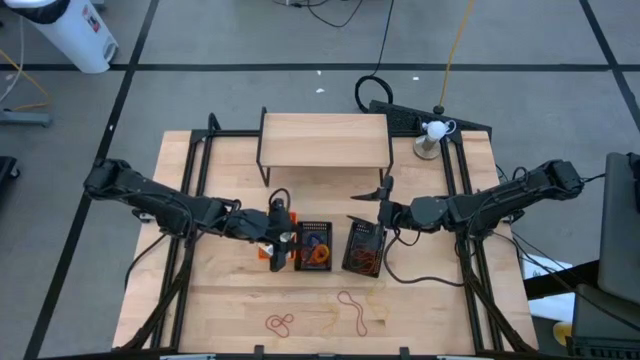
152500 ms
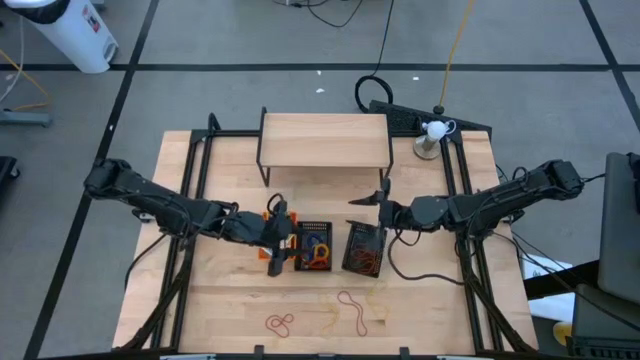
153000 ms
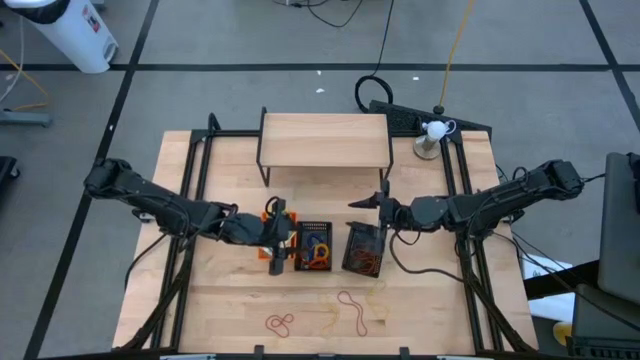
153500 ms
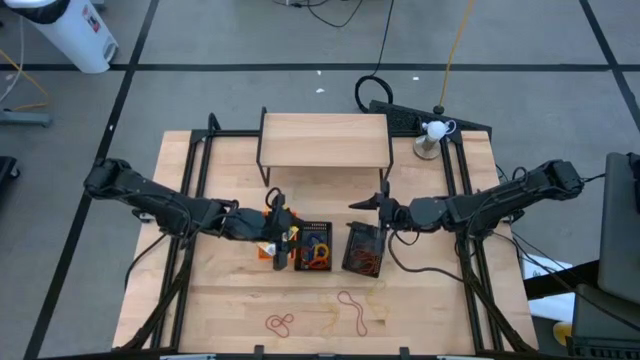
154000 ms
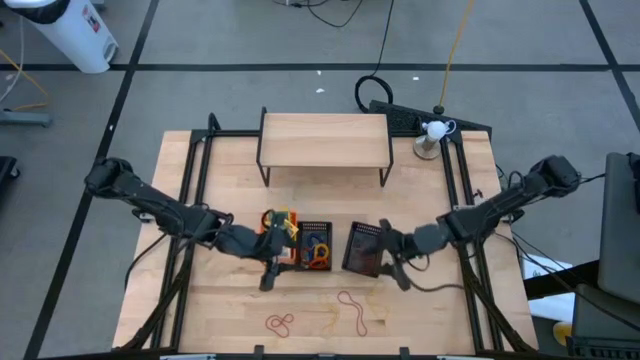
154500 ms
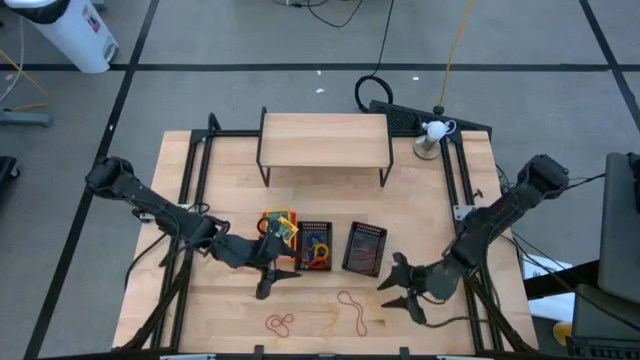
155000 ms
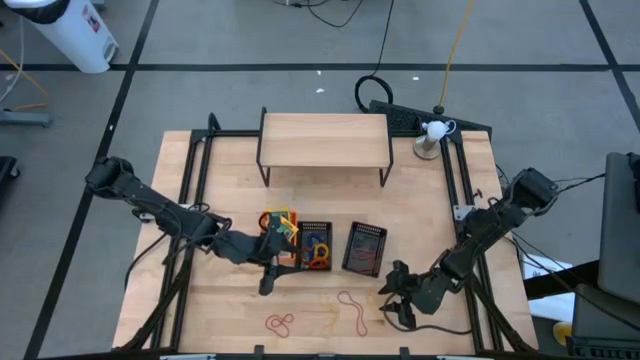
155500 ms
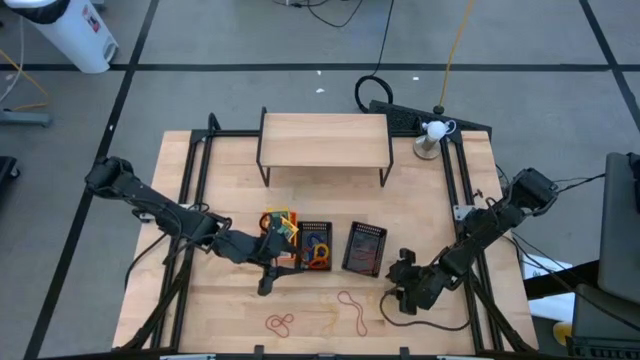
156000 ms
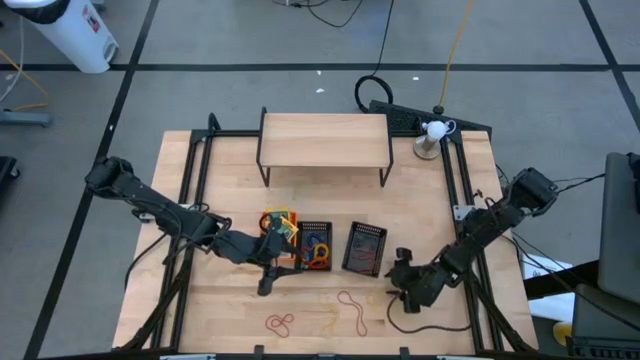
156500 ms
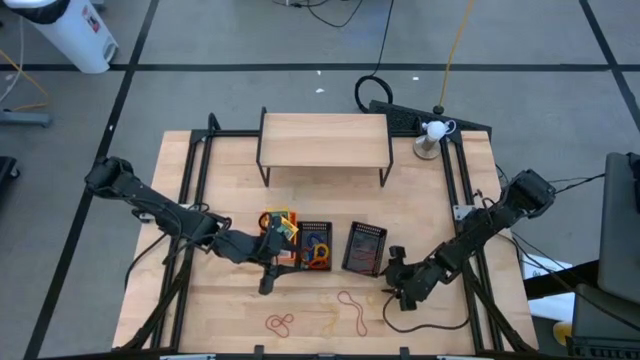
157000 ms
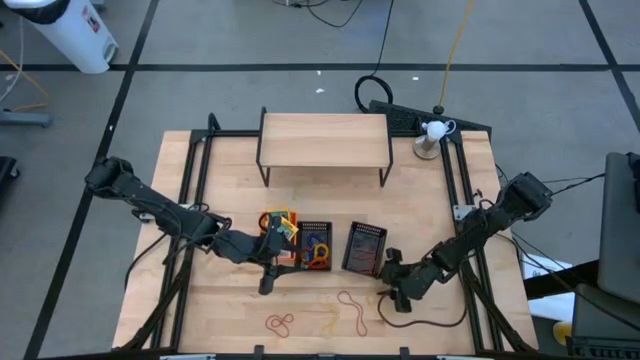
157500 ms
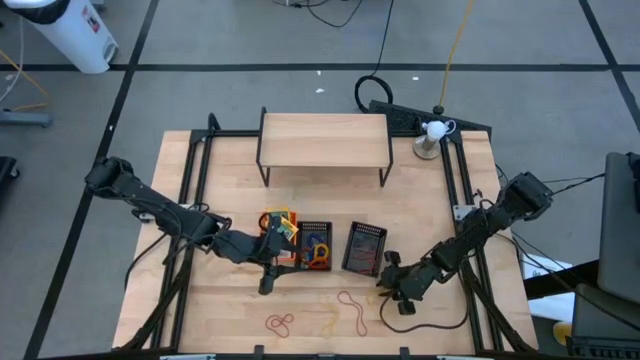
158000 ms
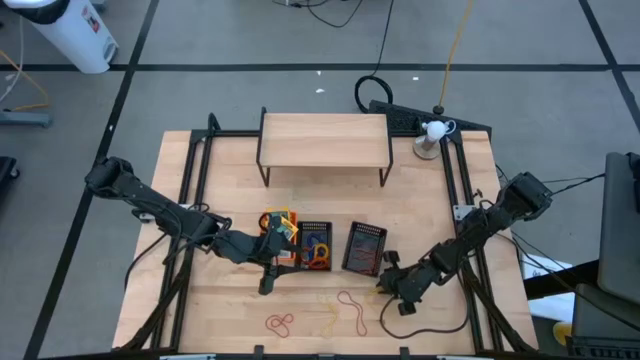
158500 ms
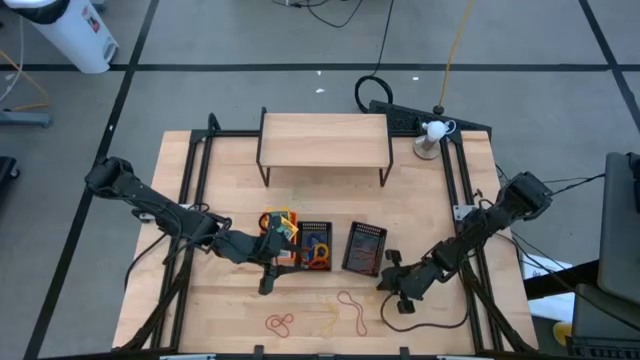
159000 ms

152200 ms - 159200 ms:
Task: Pick & Place Office Desk Supplies
Put the yellow rubber band into the right black bin

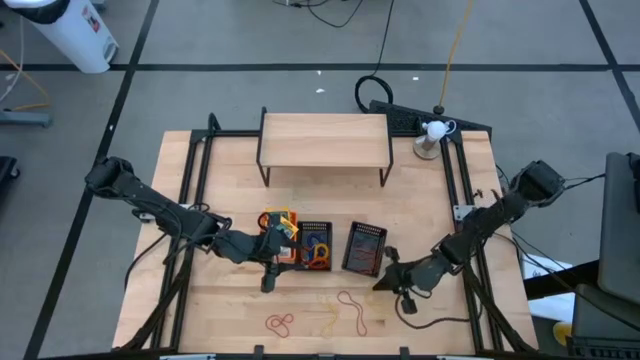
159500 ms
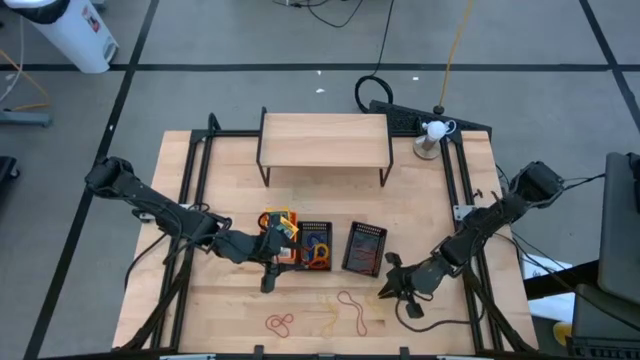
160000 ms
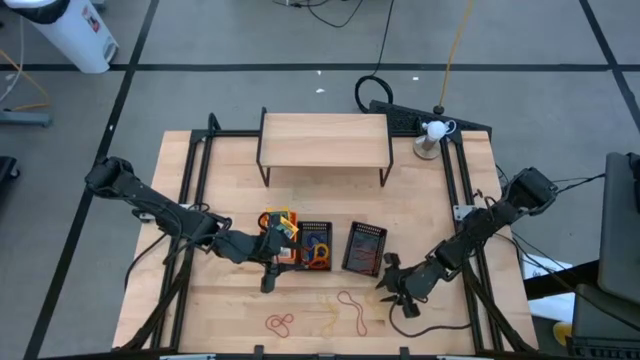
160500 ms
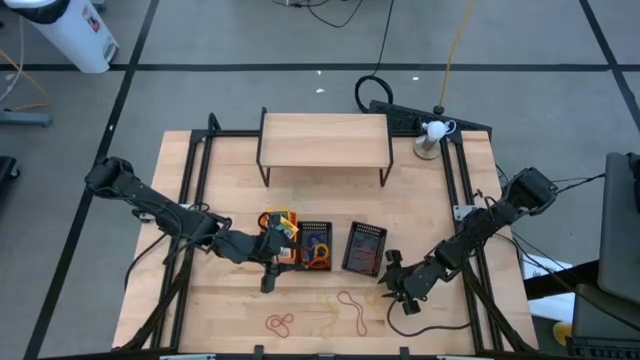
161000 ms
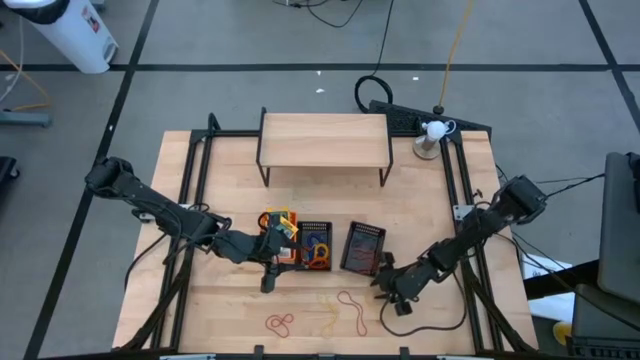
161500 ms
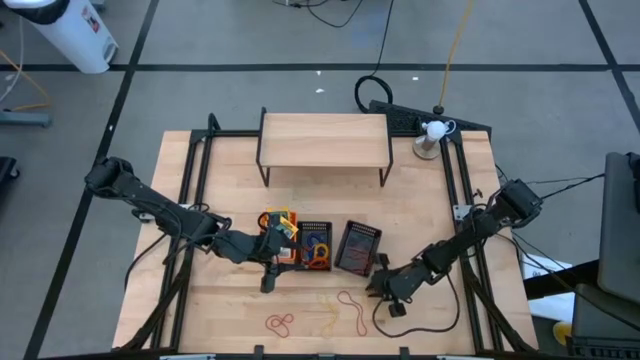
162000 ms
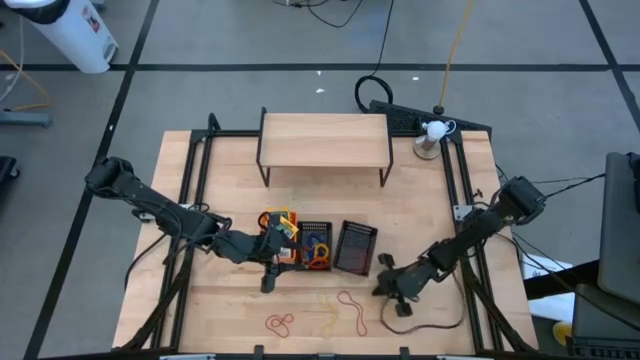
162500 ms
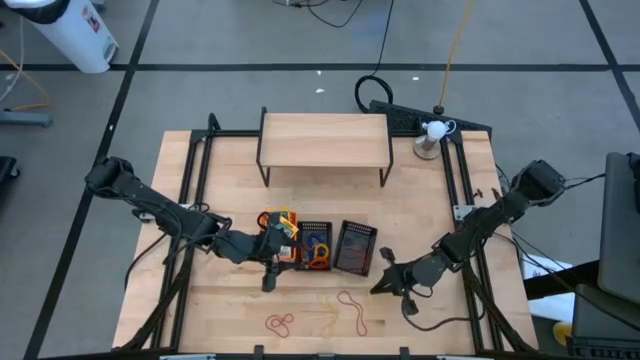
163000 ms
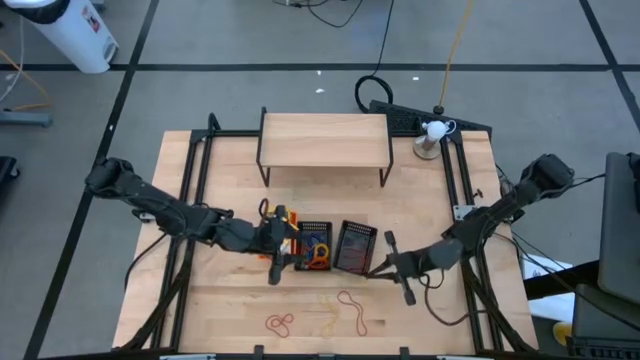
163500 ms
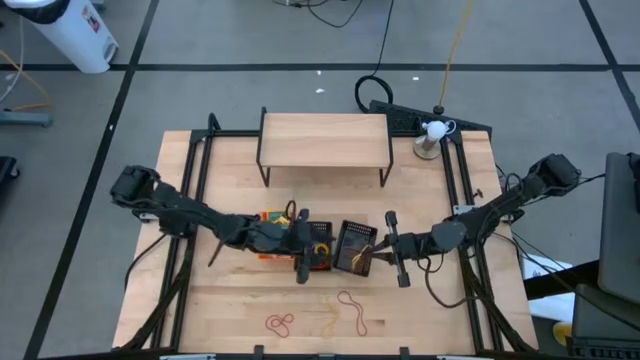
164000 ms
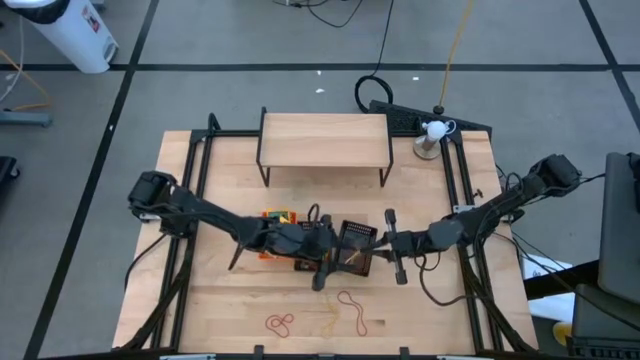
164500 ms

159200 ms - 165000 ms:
Put the yellow rubber band into the right black bin

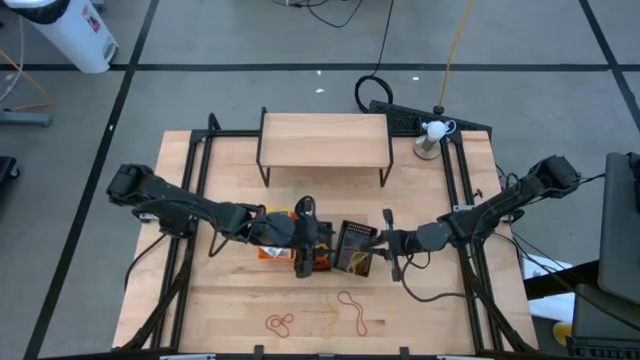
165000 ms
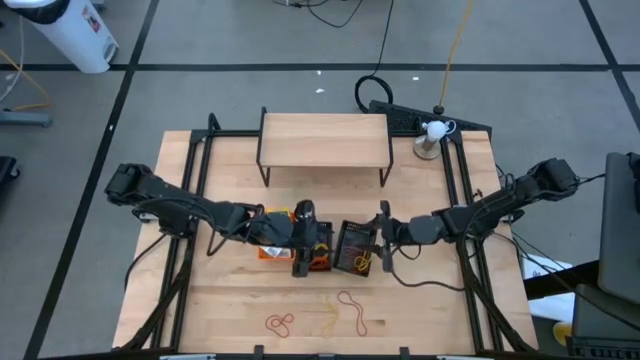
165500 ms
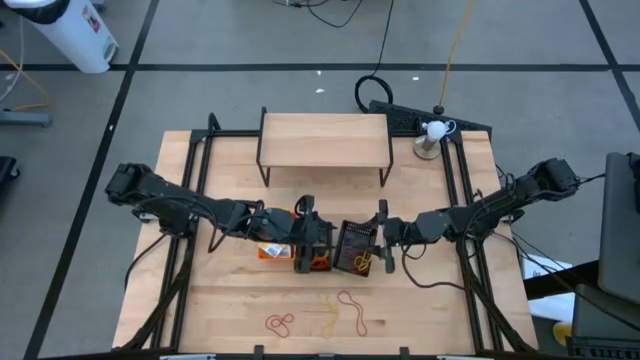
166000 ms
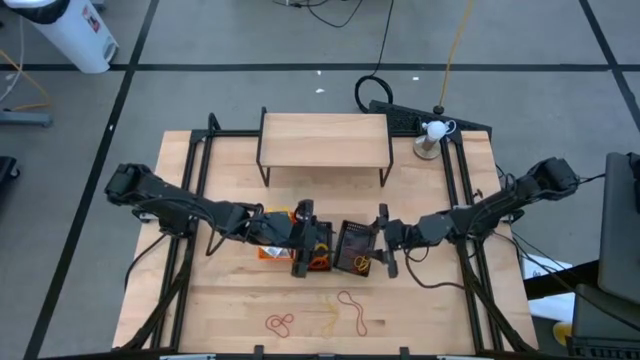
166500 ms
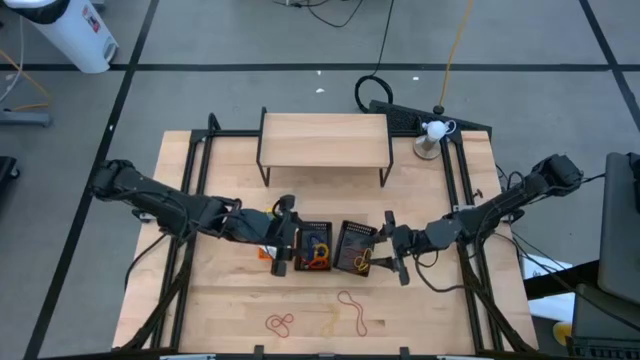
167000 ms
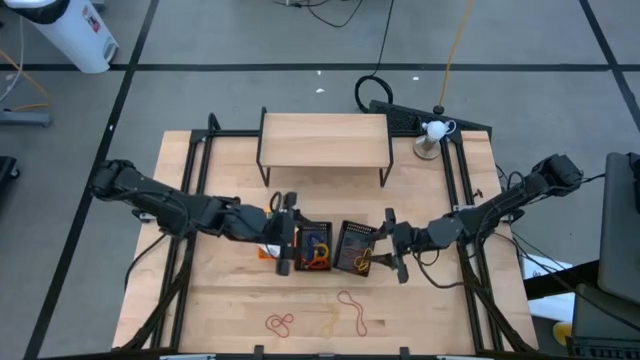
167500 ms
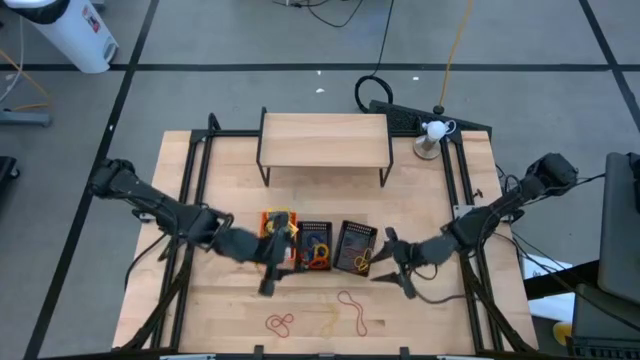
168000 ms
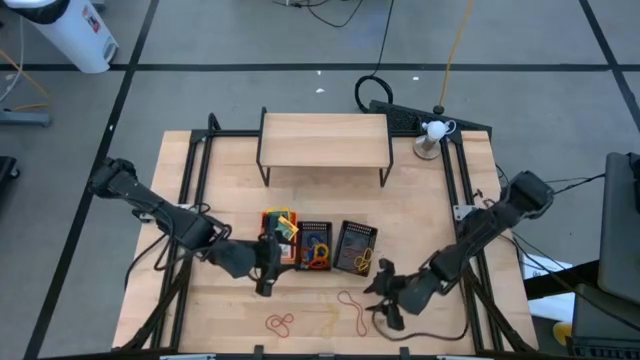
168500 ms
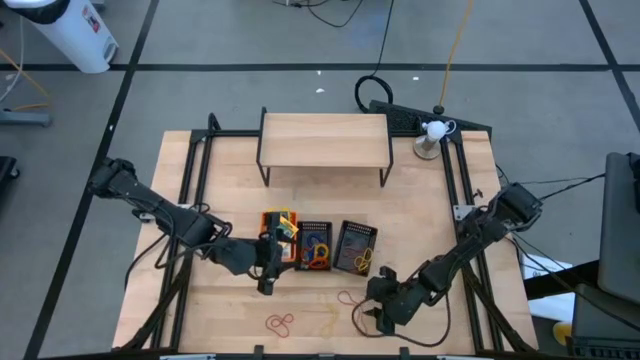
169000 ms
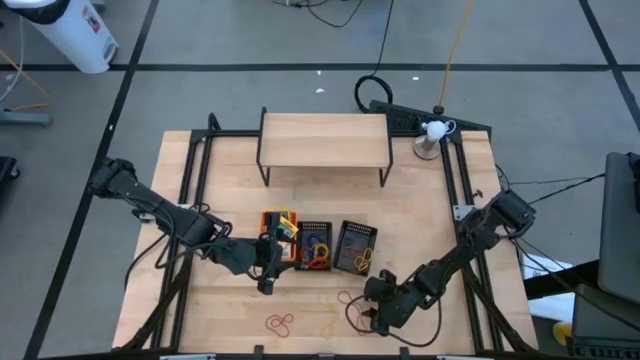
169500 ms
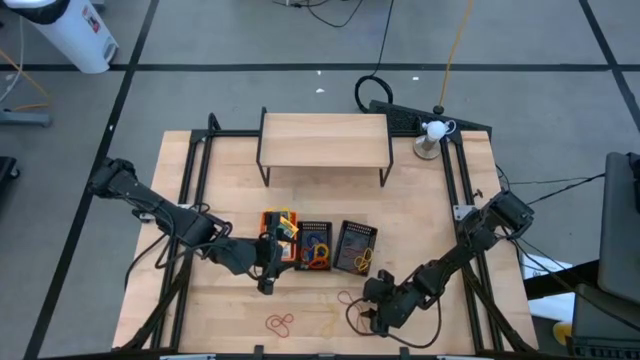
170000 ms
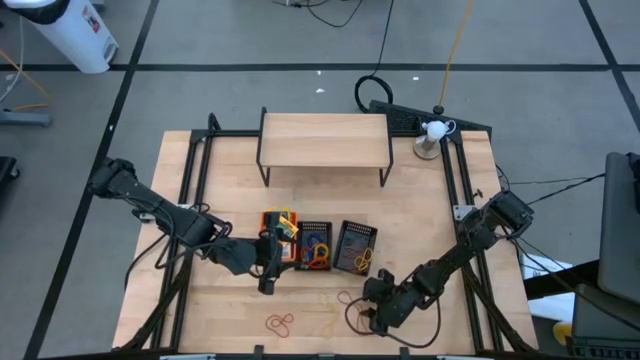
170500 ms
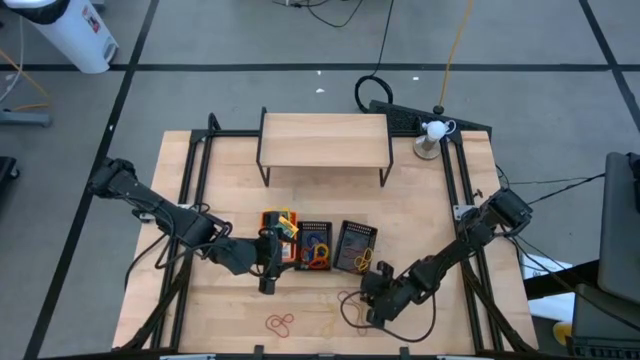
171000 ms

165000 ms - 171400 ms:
Put the red rubber band into the right black bin

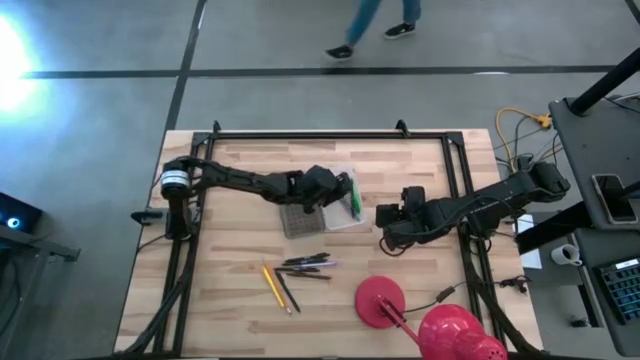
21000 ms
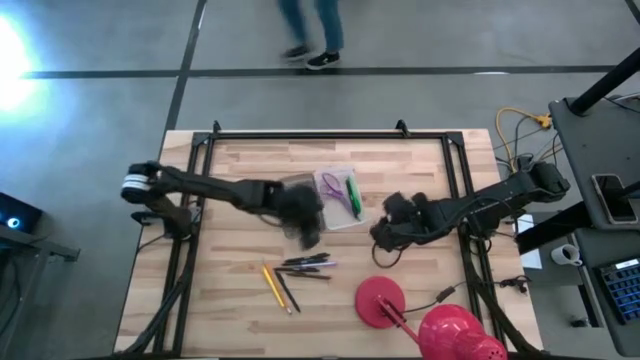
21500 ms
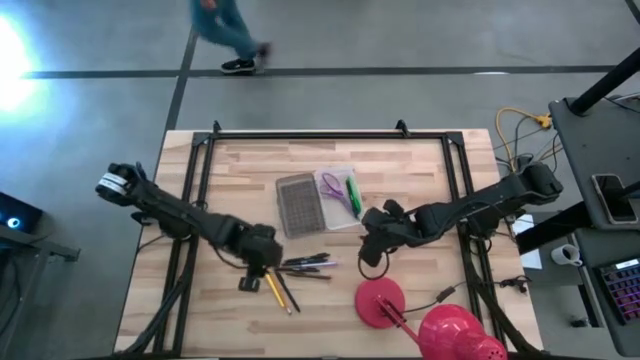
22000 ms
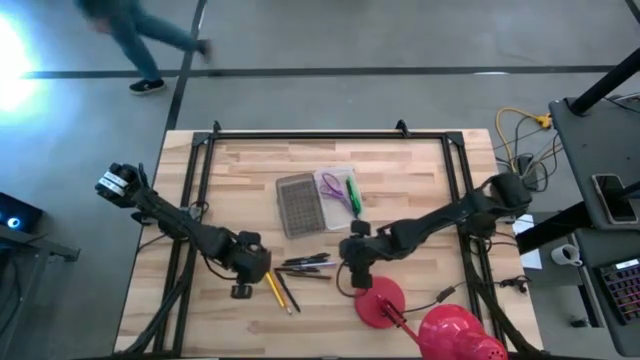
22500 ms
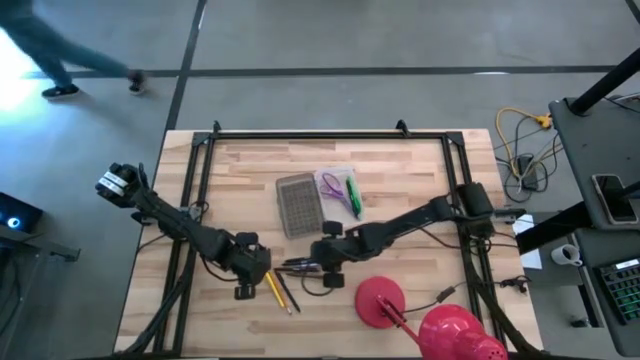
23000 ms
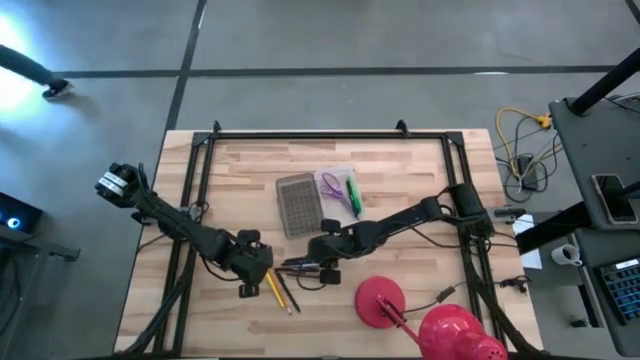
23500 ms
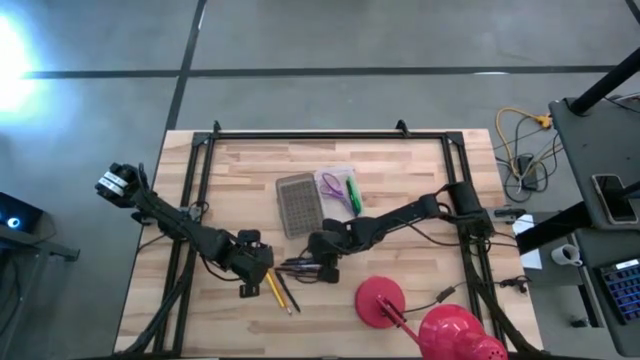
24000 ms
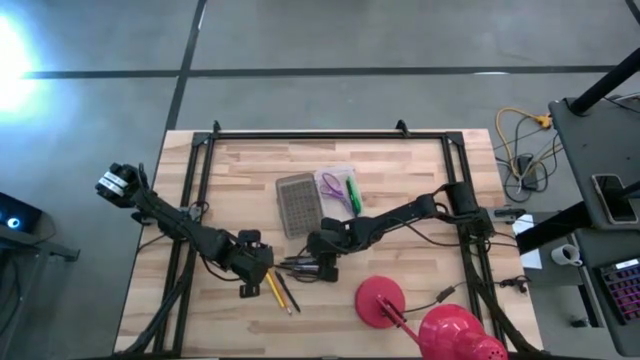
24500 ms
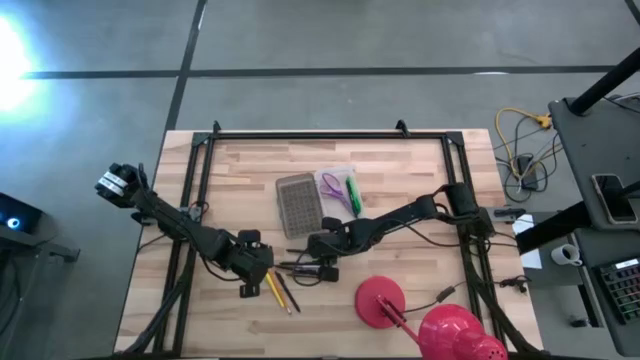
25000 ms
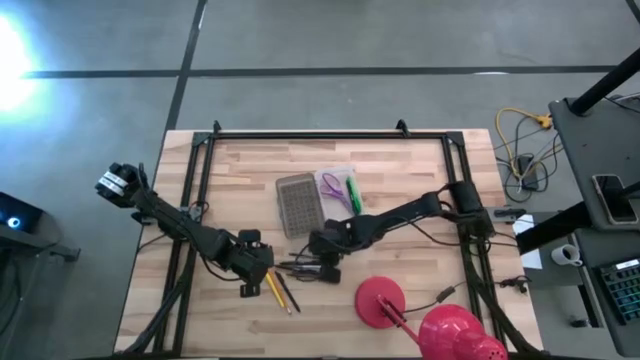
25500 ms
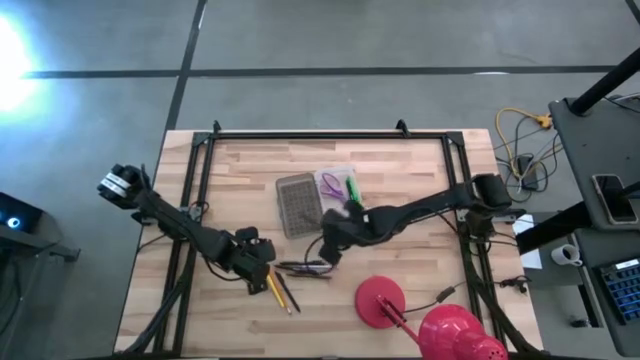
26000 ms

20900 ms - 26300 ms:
Task: Pick & place school supplies into a supply box
Put the black pen into the black supply box
